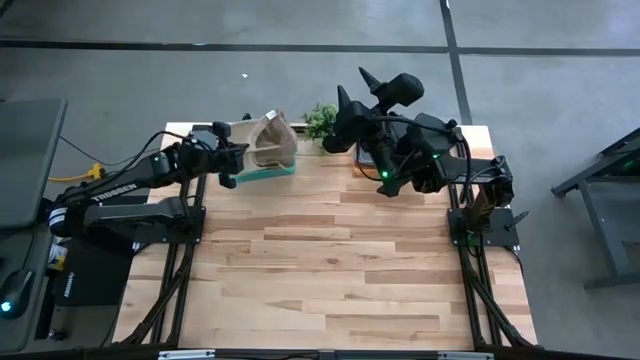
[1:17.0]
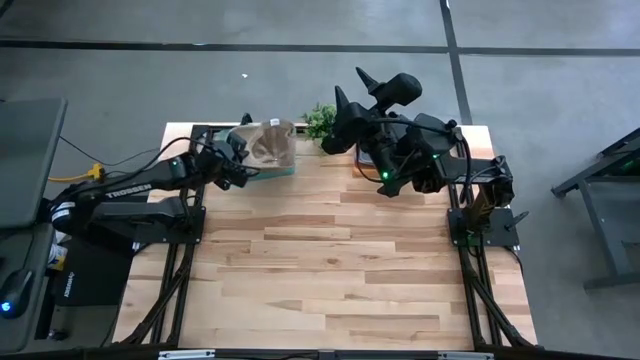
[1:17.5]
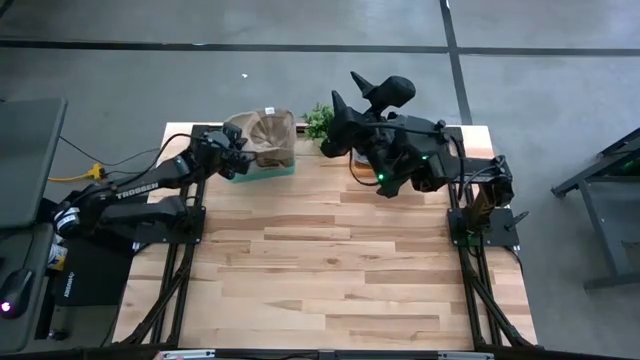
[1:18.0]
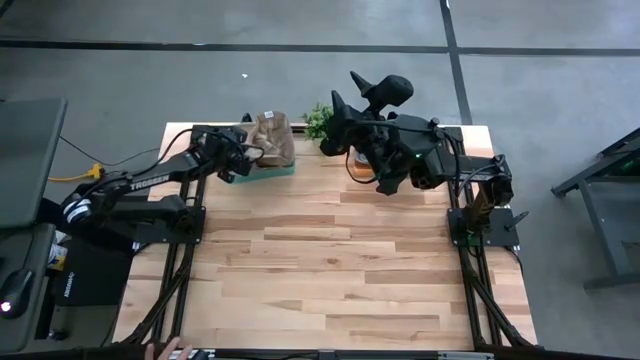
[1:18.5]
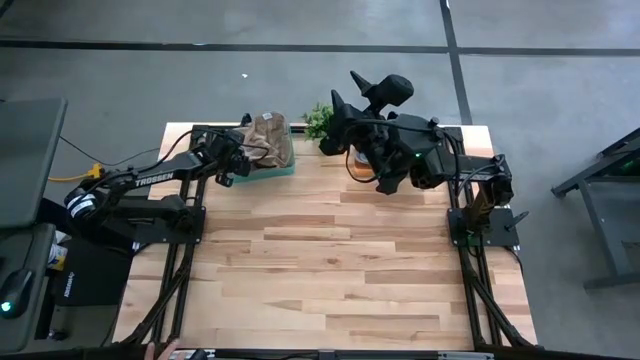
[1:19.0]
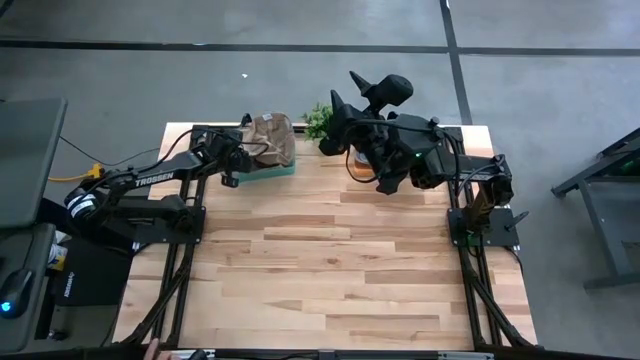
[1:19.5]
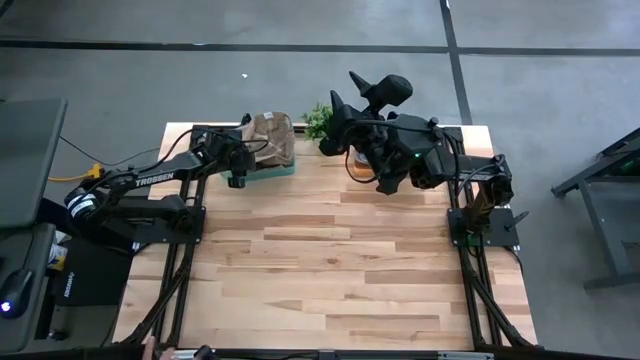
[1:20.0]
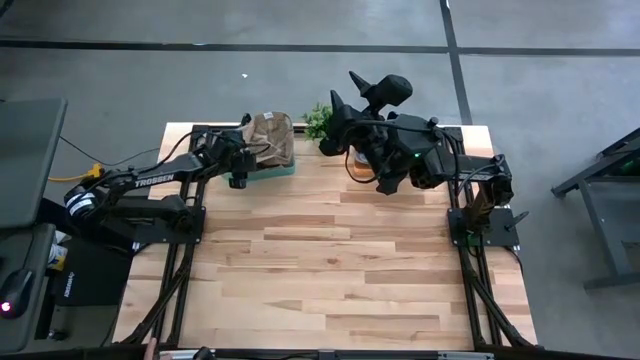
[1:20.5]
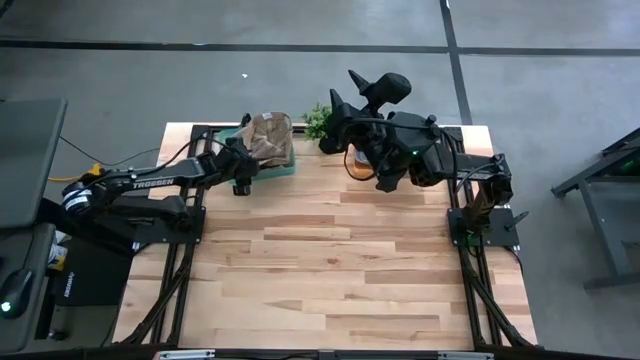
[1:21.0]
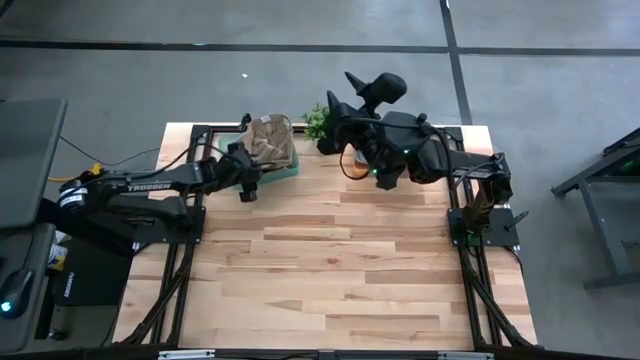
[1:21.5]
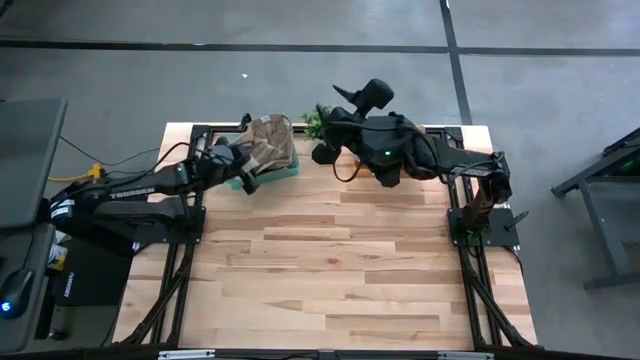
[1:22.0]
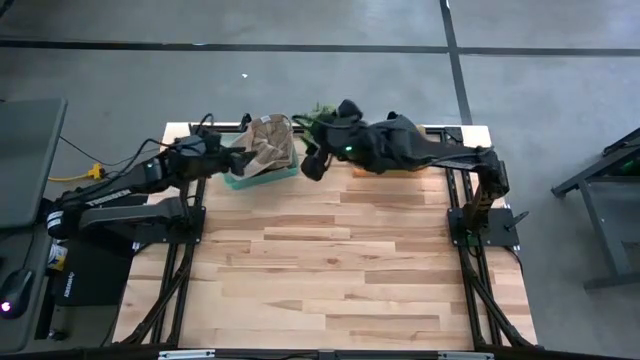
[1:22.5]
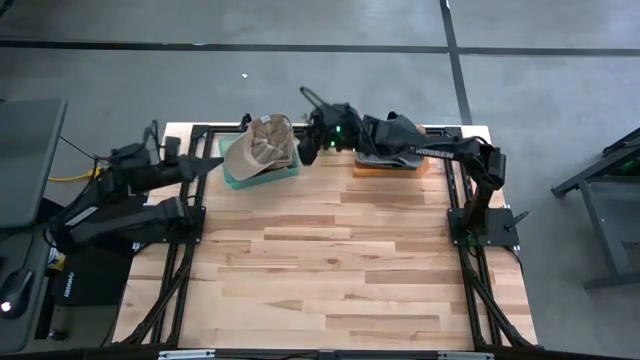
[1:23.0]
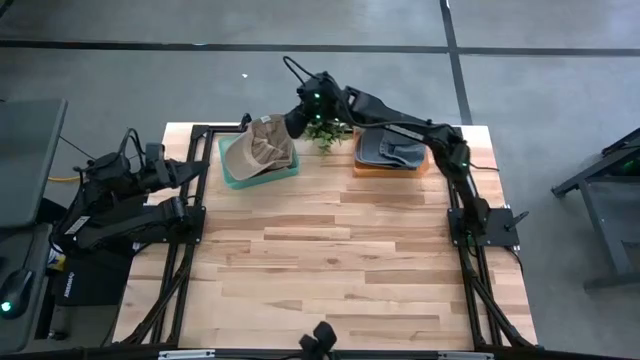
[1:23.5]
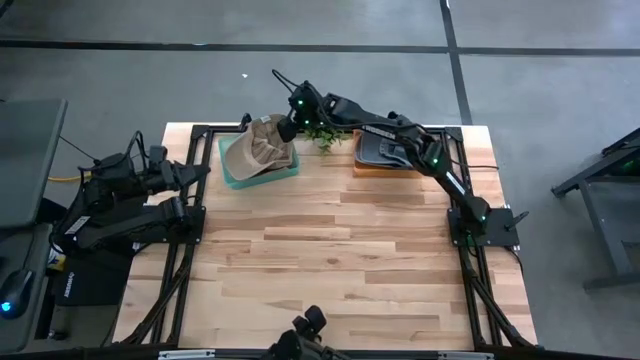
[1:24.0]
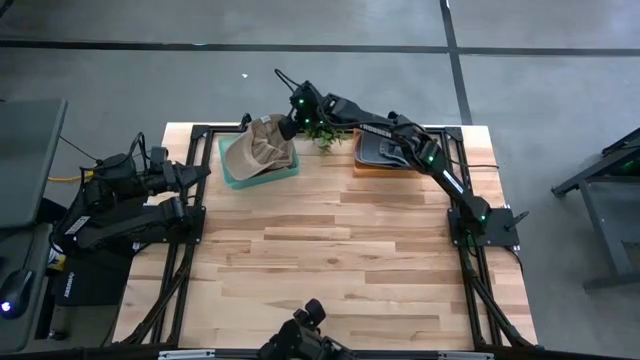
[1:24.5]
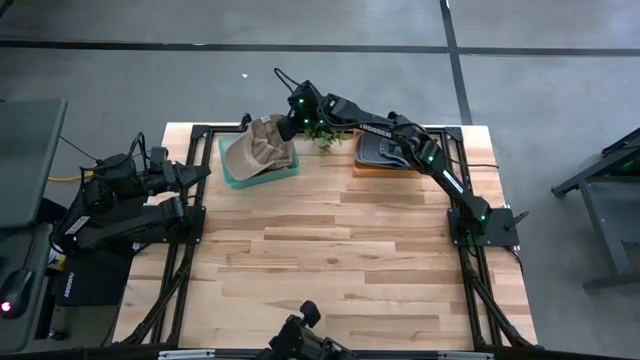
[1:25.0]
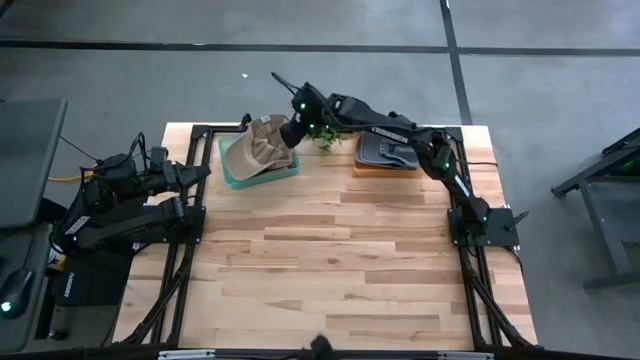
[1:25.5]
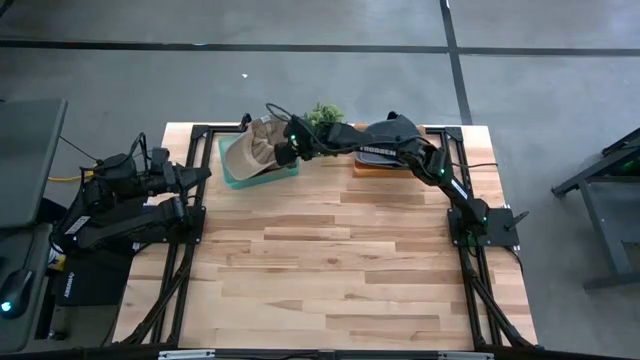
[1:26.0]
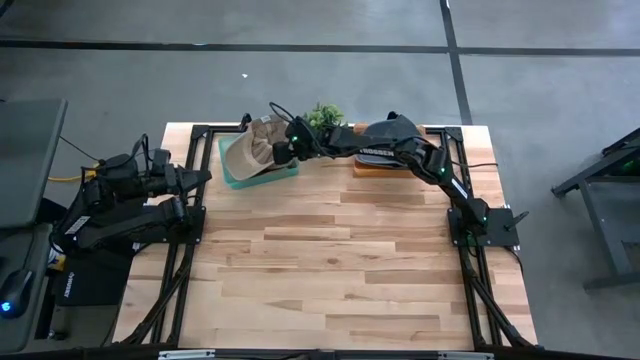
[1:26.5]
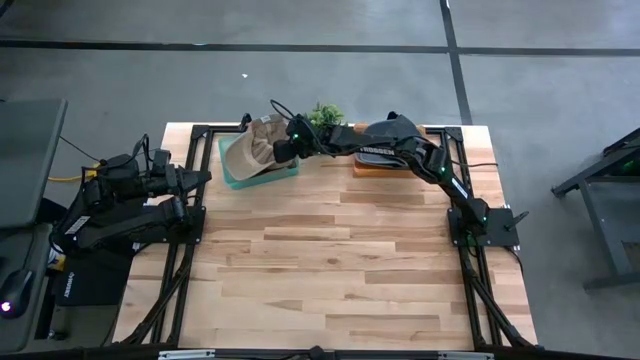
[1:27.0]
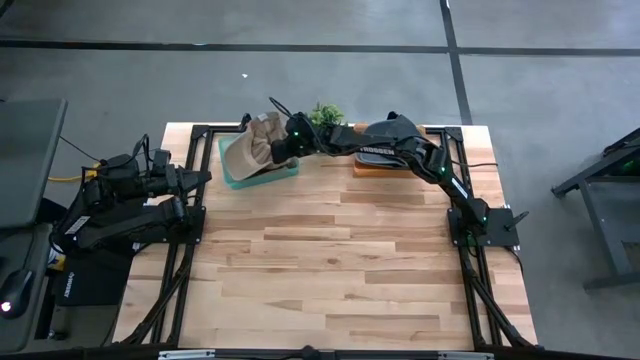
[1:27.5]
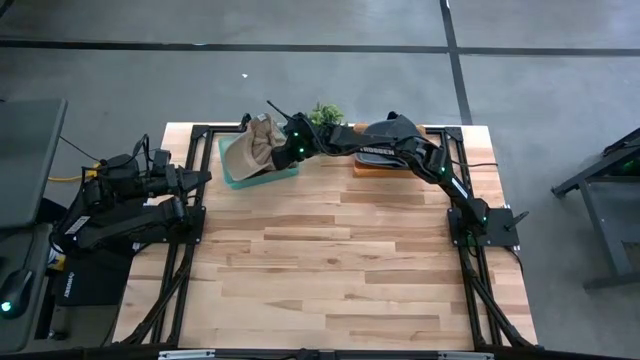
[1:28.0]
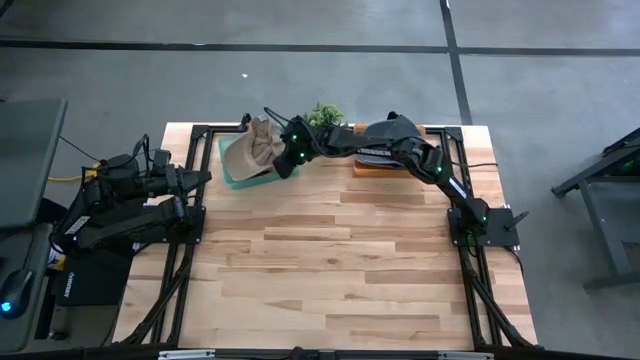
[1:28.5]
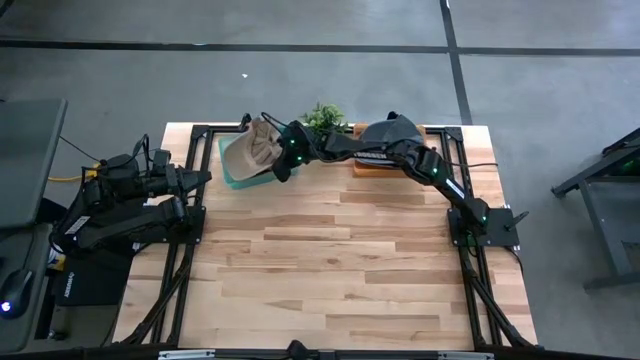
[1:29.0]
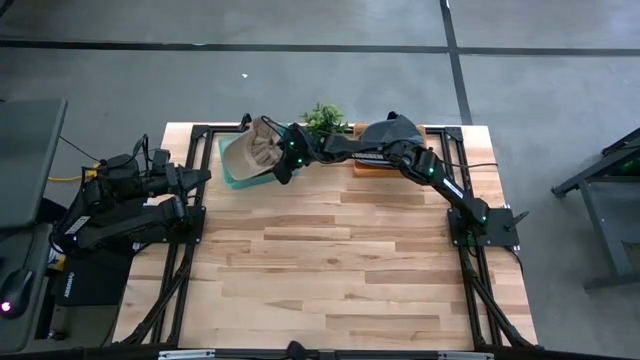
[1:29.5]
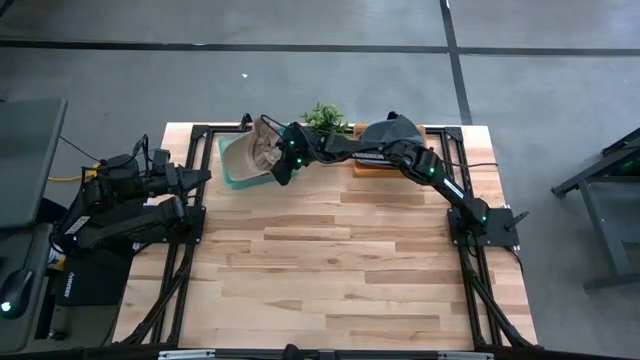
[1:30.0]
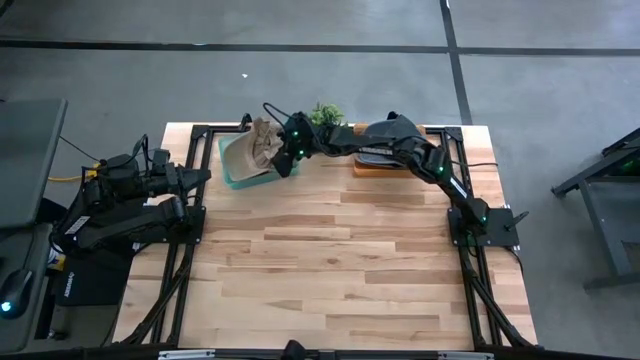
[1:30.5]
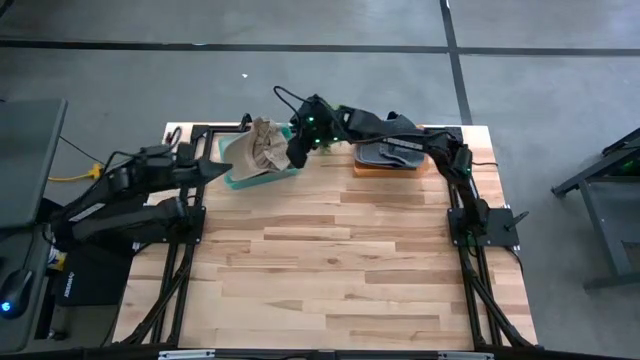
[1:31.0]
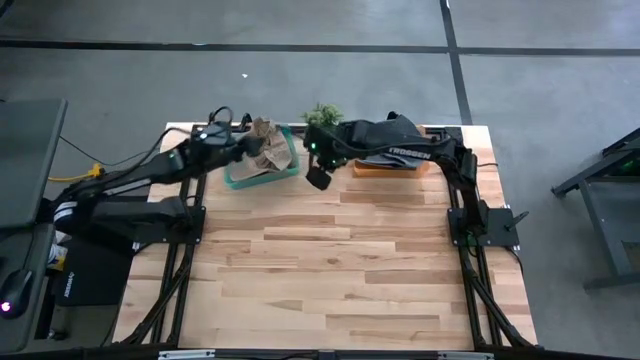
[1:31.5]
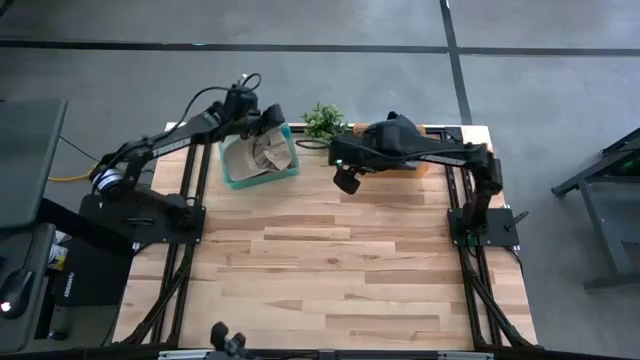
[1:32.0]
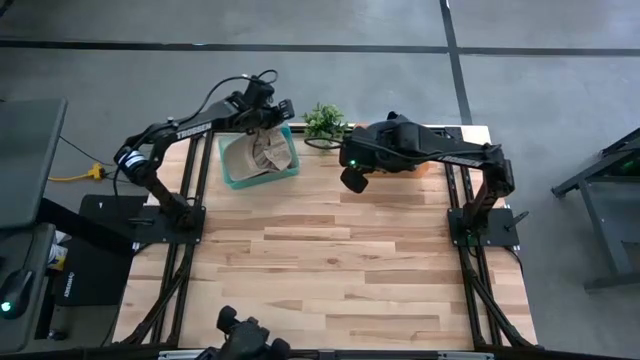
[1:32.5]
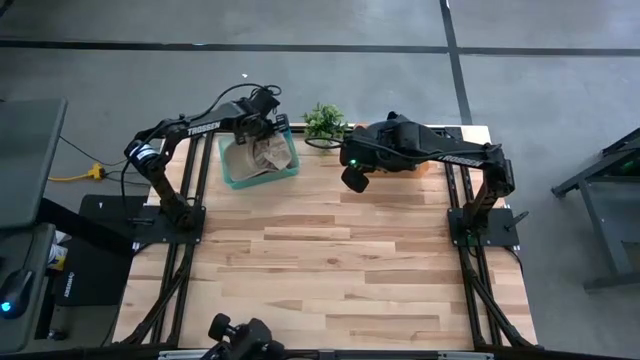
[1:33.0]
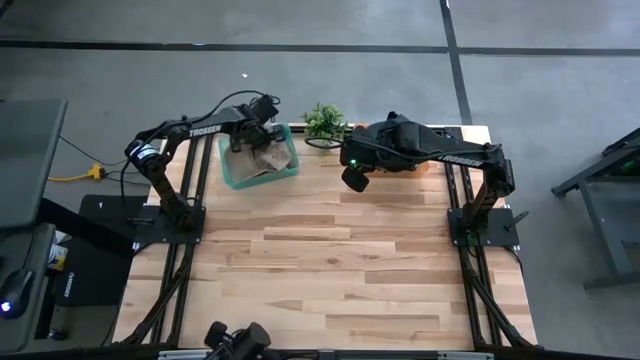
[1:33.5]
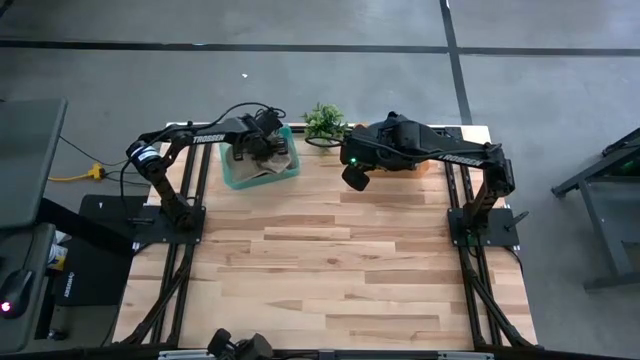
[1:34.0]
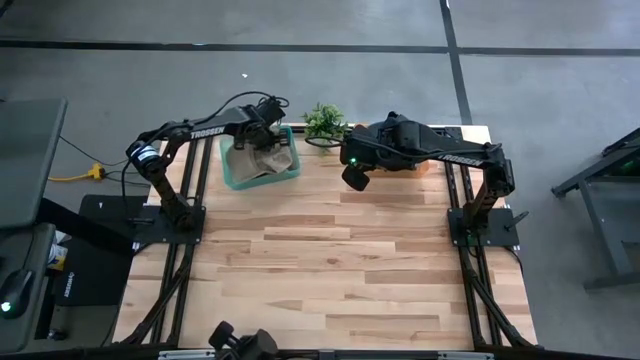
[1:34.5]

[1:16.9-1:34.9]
Task: Pick & Place hat
Put the brown cap into the blue bin

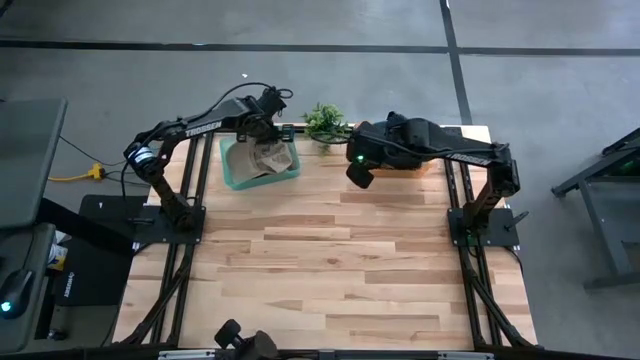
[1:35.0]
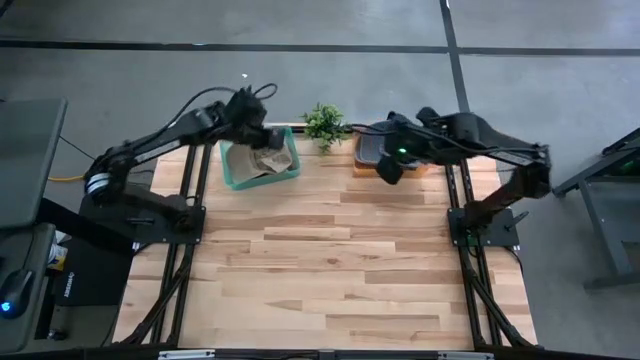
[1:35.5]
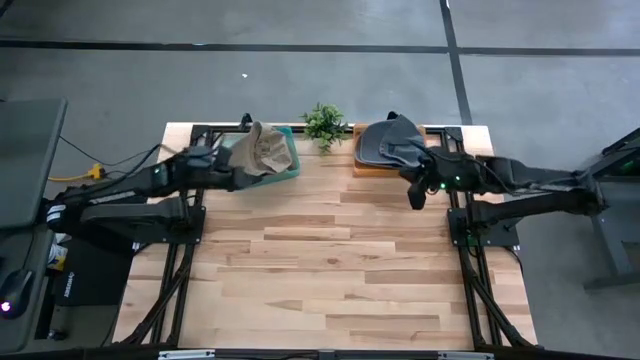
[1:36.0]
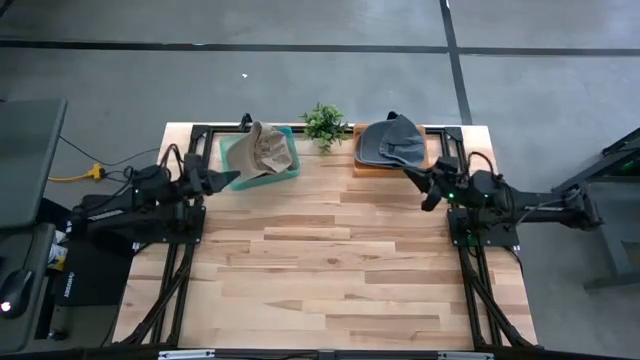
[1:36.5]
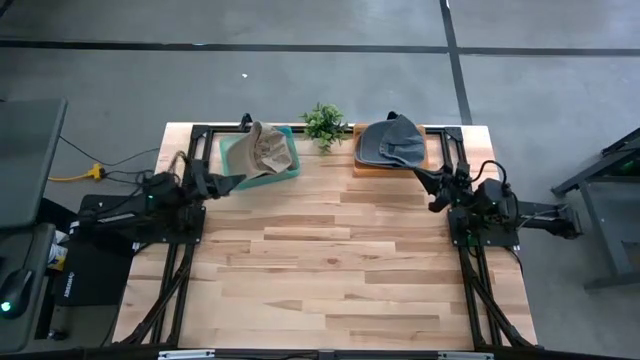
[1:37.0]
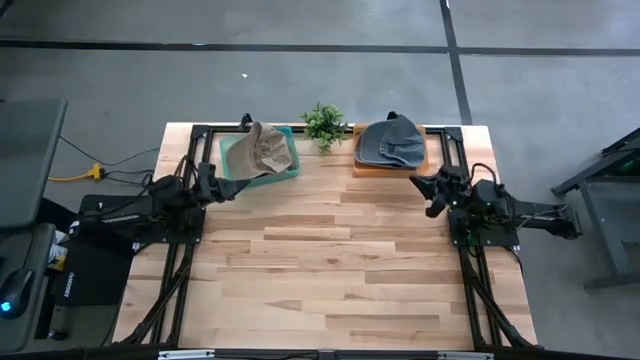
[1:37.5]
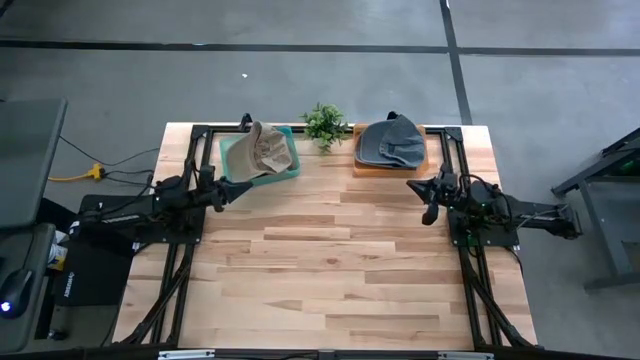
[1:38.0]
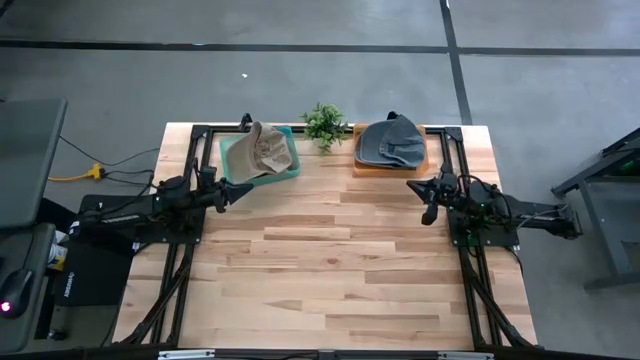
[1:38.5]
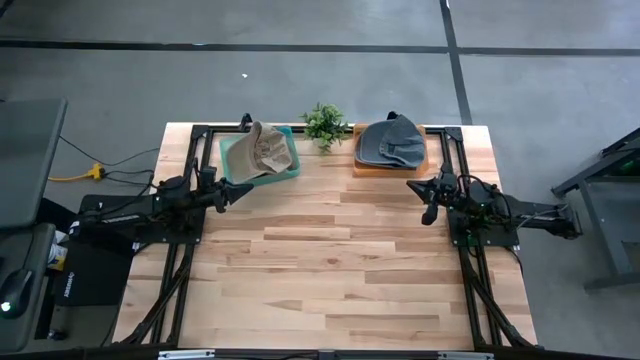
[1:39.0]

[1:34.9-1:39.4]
Return to Home Position
